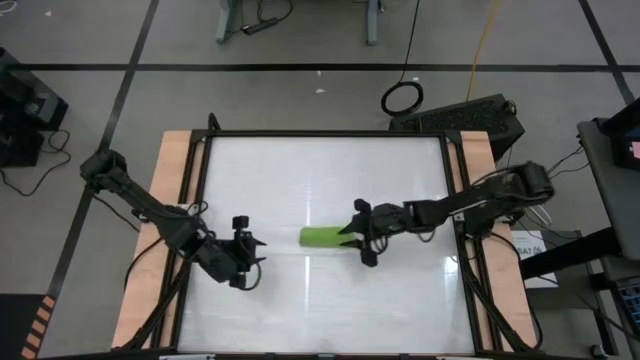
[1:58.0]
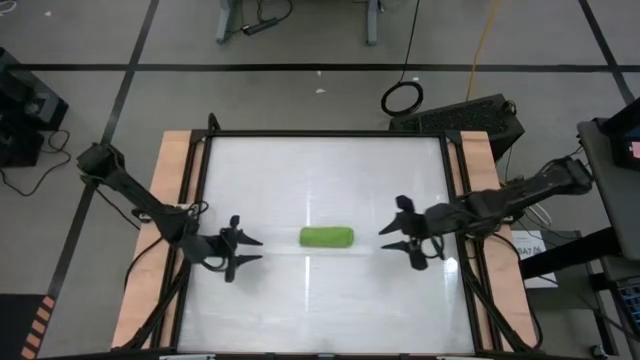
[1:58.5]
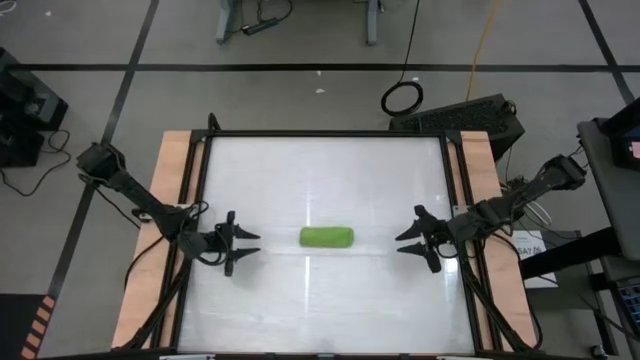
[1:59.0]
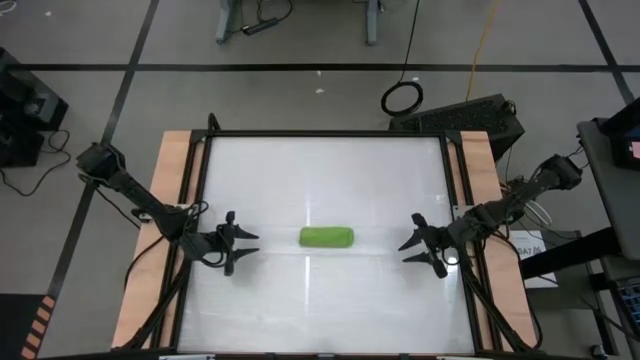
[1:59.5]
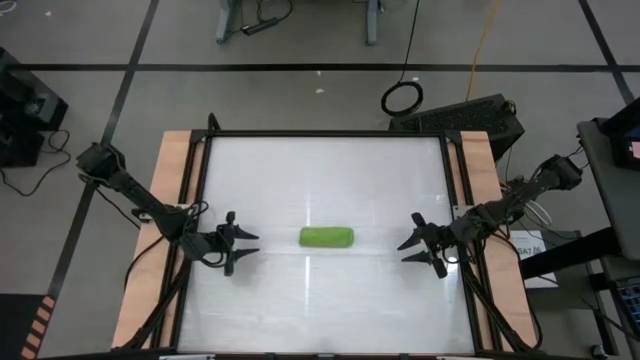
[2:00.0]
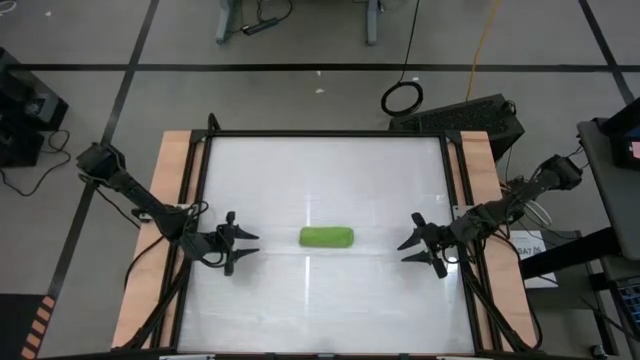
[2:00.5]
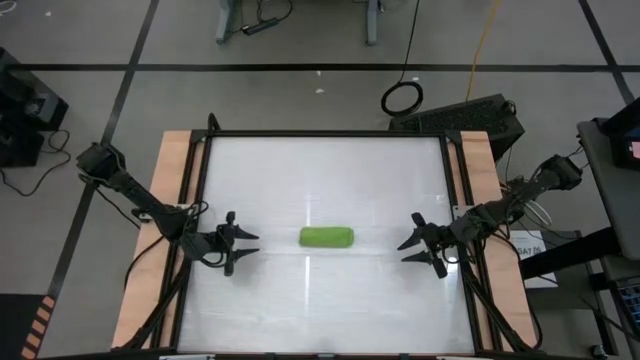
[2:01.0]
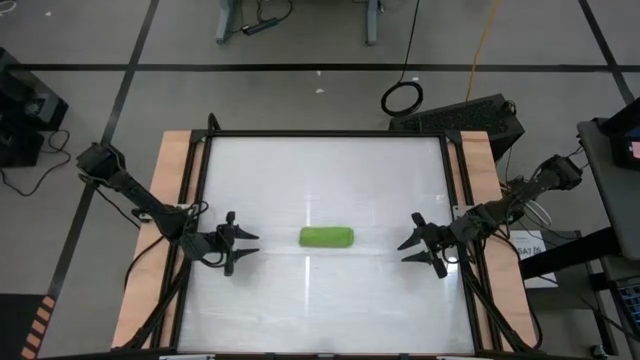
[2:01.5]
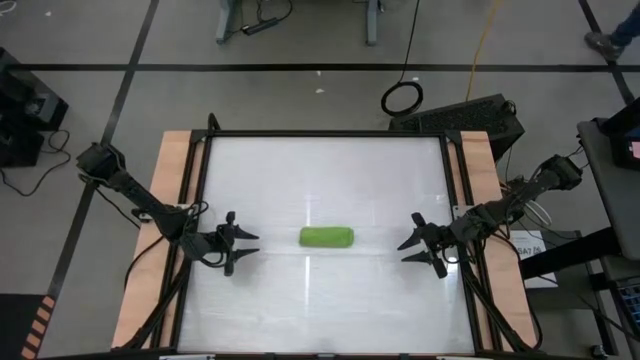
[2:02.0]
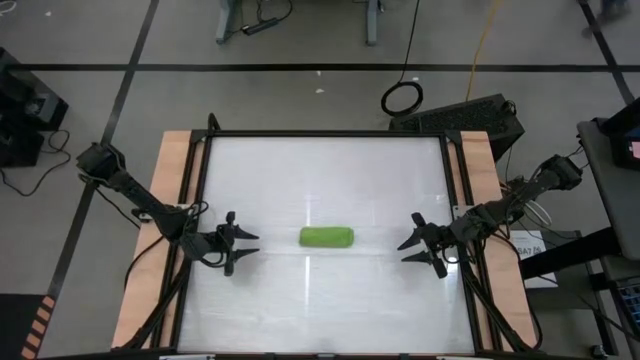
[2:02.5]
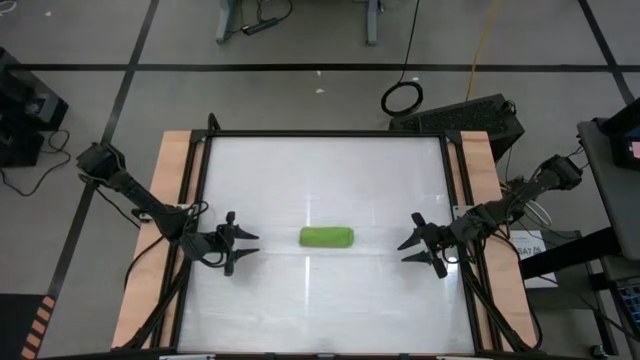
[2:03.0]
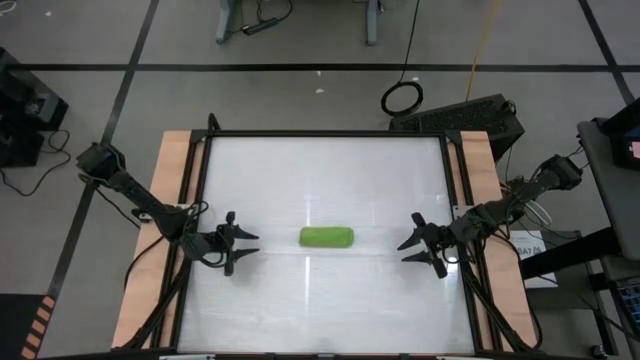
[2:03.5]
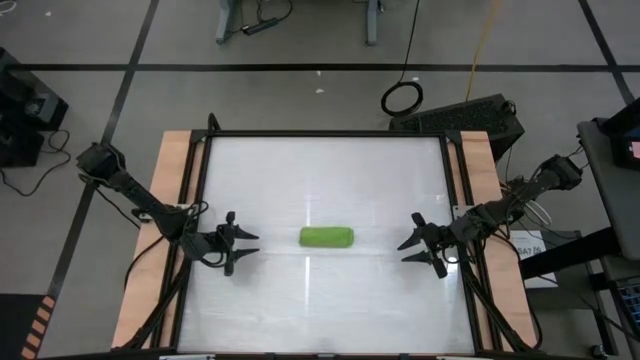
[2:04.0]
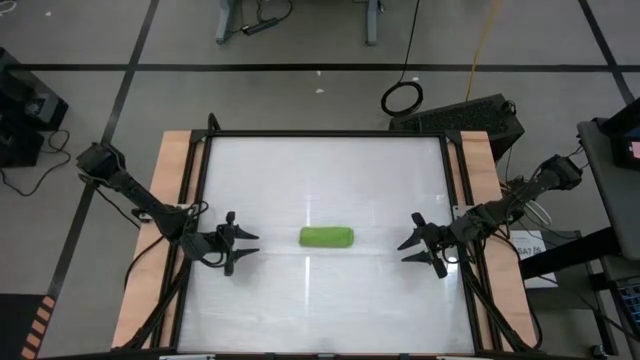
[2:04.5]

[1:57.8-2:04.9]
Task: Roll towel
Return to Home Position

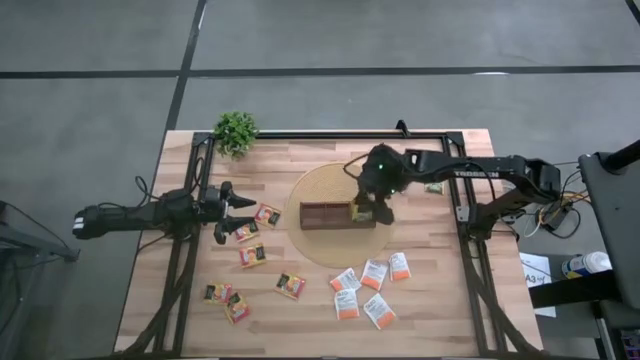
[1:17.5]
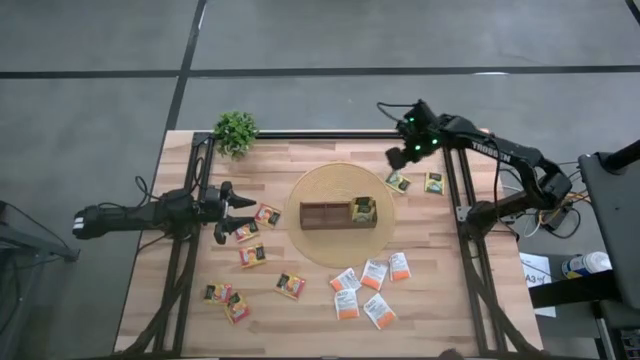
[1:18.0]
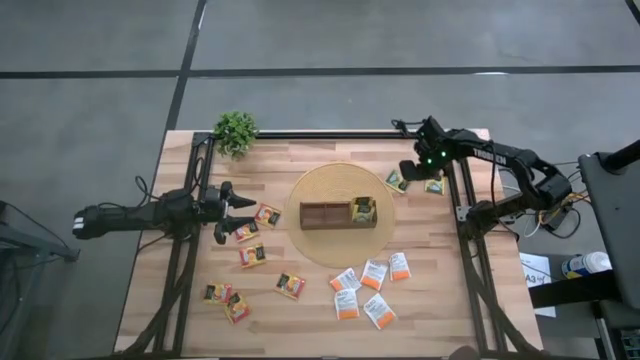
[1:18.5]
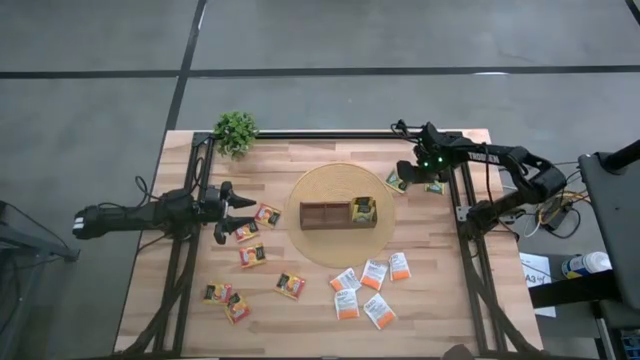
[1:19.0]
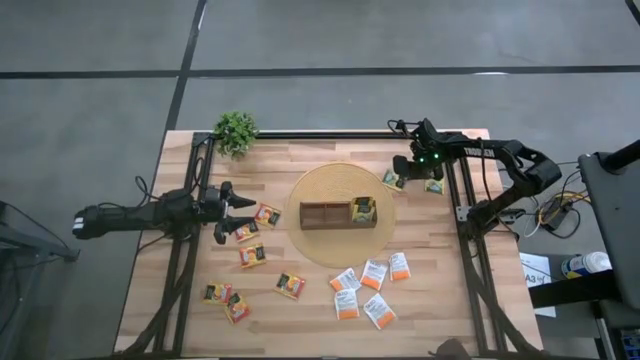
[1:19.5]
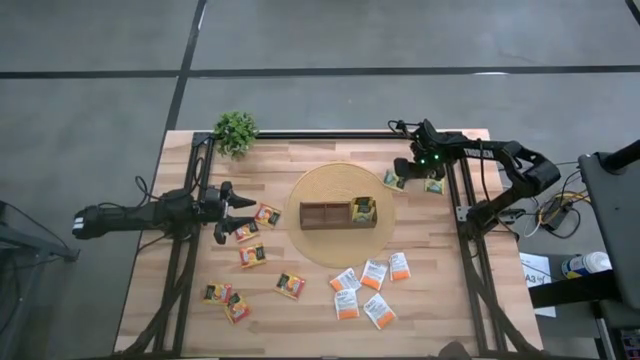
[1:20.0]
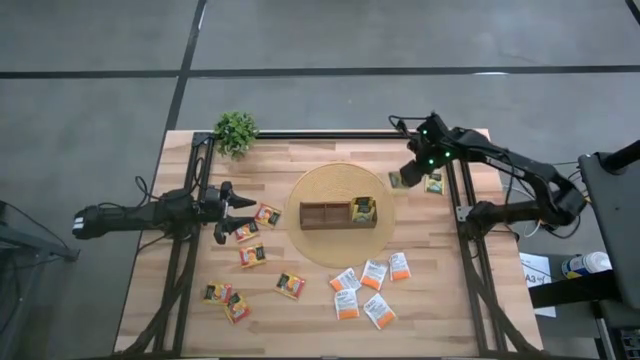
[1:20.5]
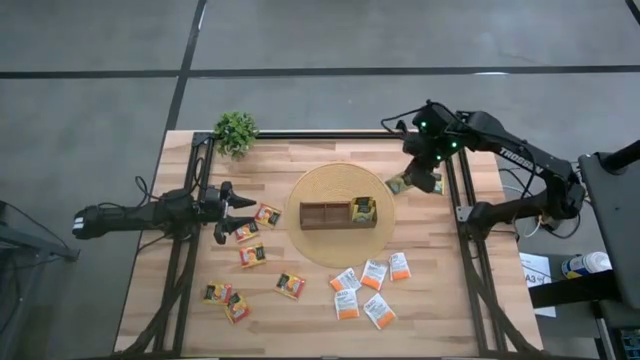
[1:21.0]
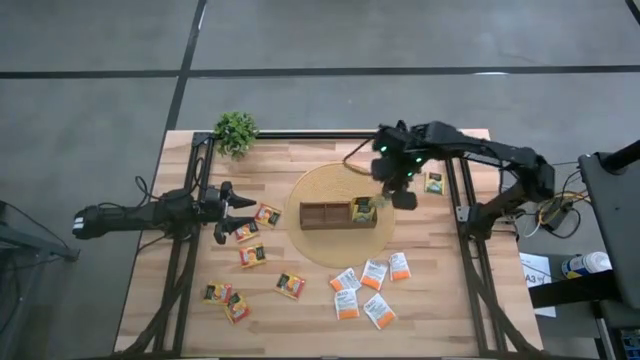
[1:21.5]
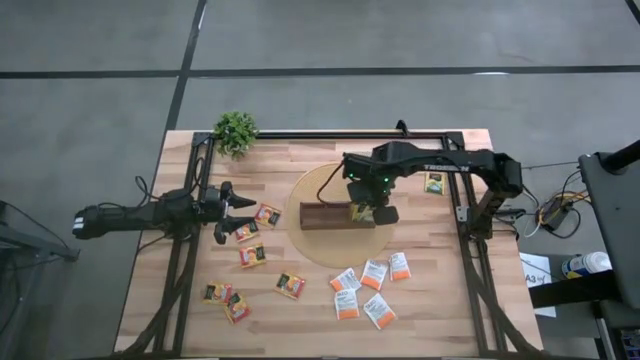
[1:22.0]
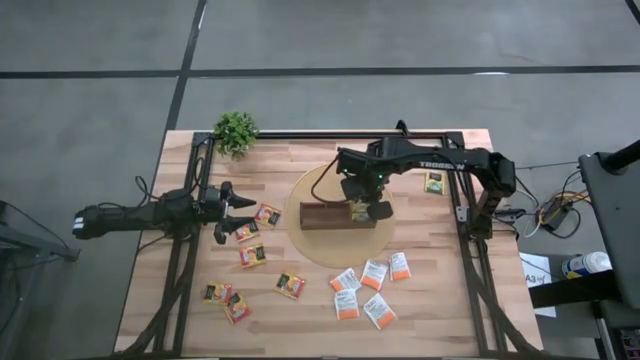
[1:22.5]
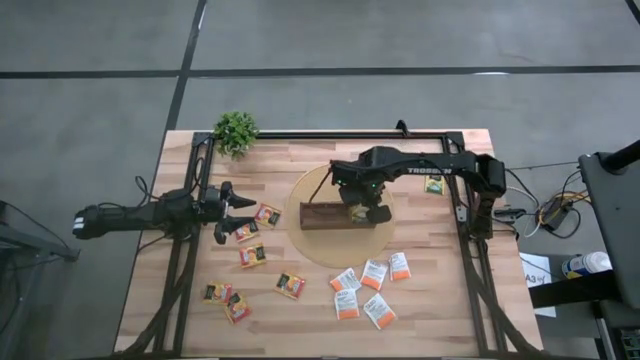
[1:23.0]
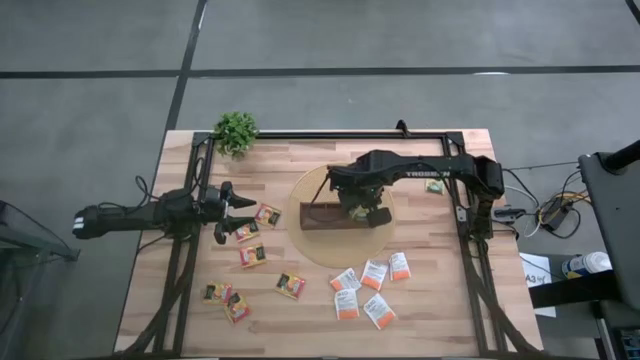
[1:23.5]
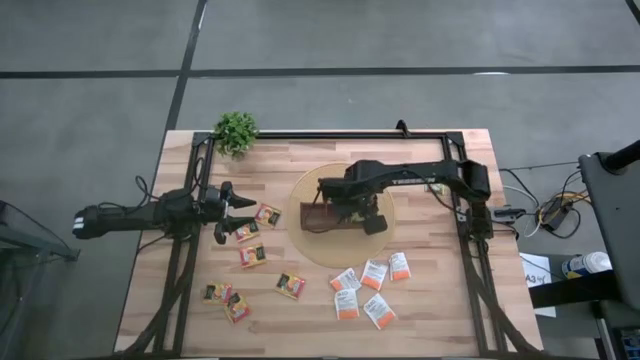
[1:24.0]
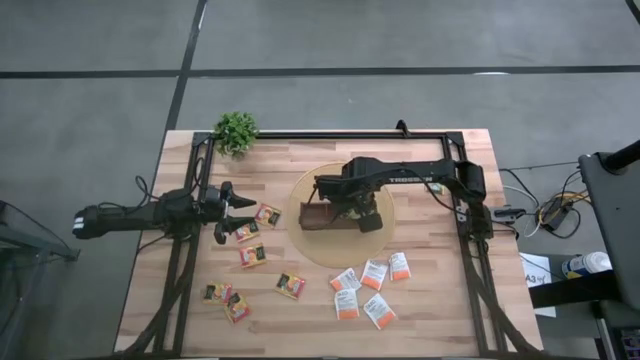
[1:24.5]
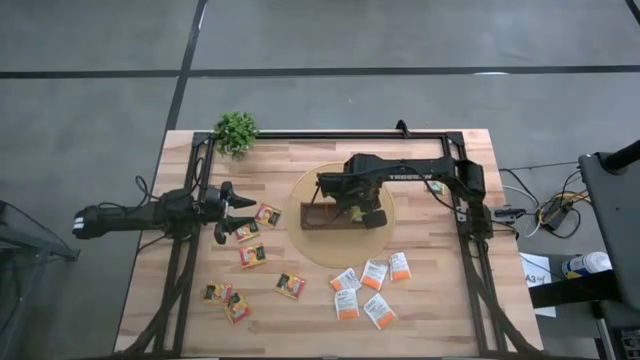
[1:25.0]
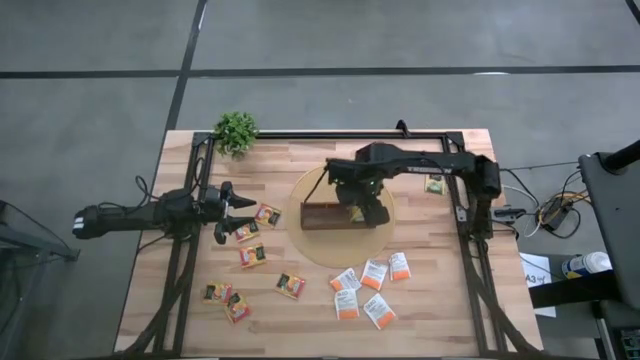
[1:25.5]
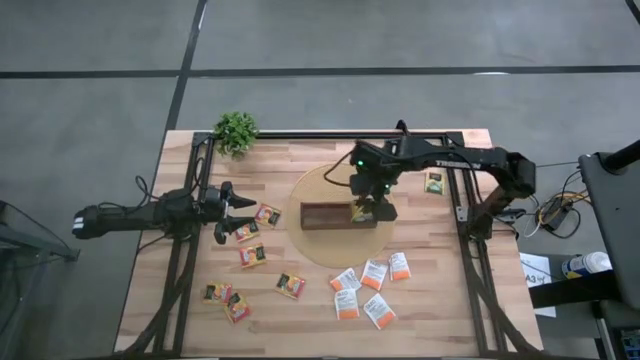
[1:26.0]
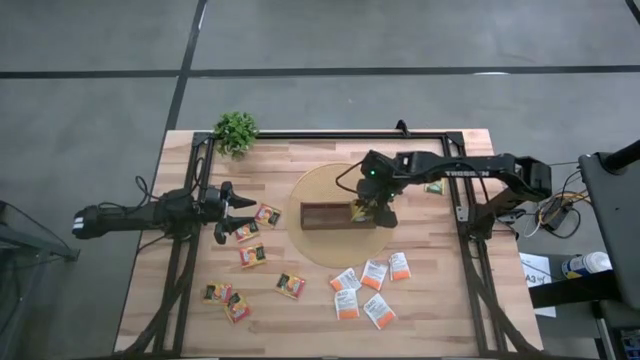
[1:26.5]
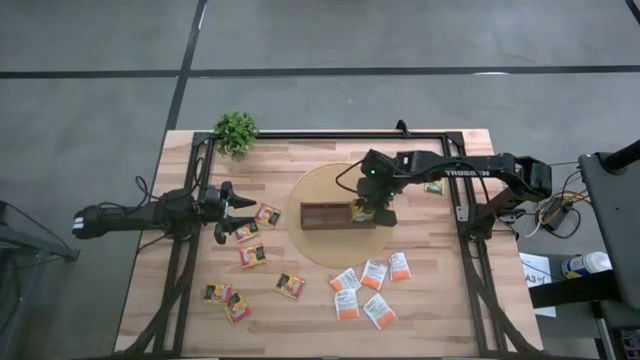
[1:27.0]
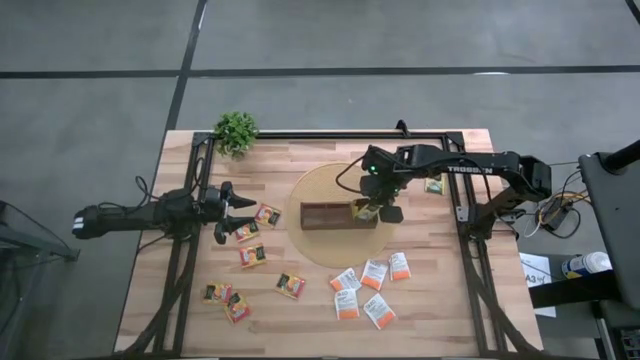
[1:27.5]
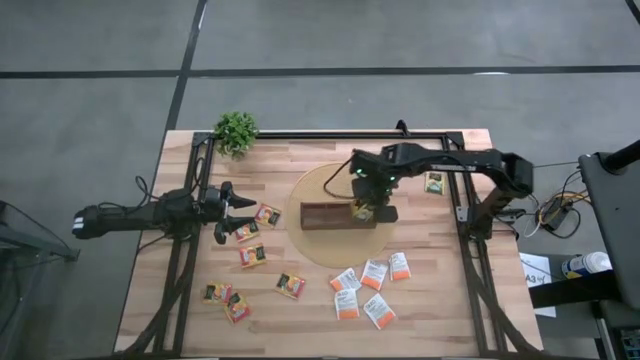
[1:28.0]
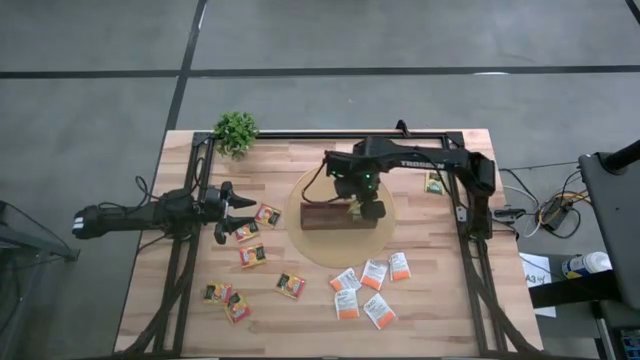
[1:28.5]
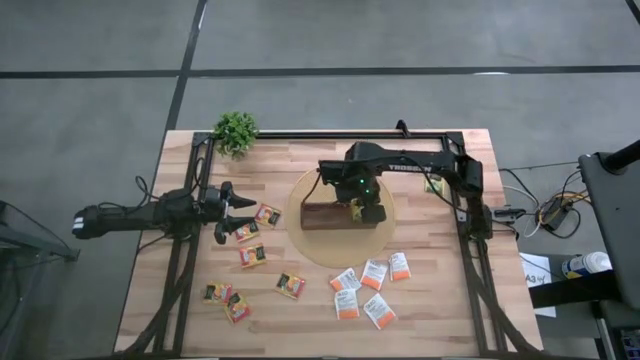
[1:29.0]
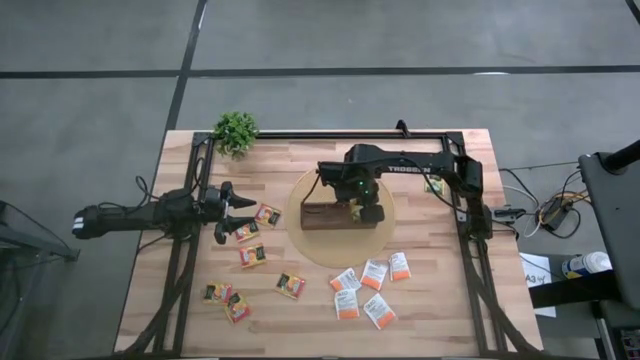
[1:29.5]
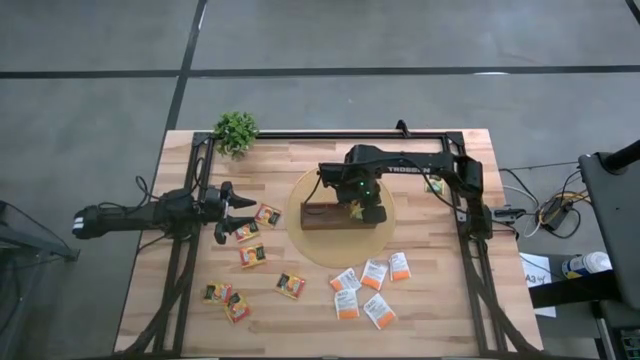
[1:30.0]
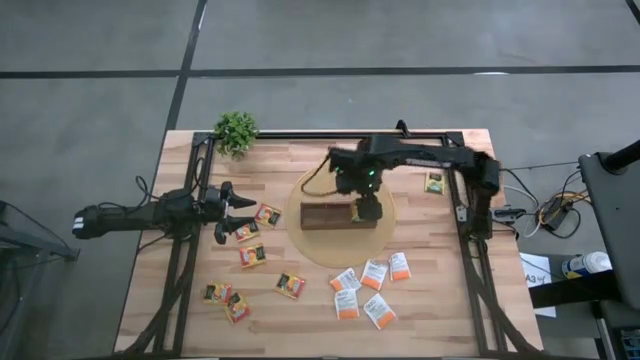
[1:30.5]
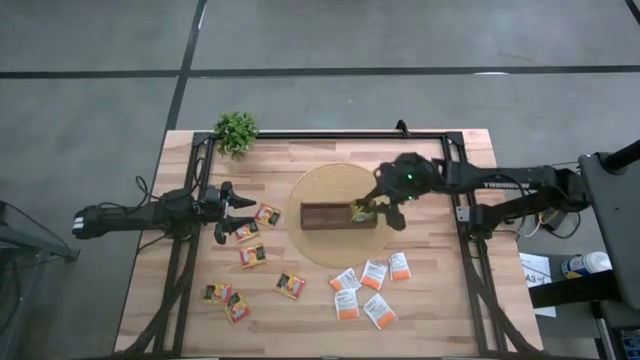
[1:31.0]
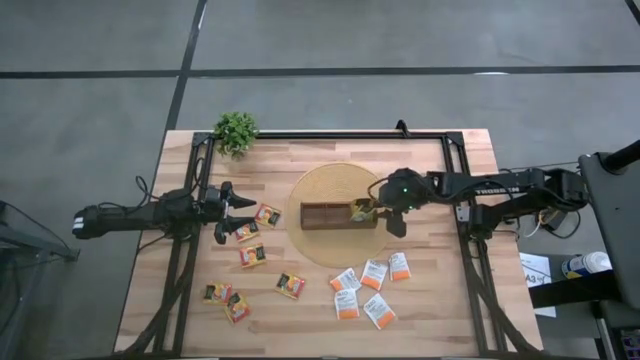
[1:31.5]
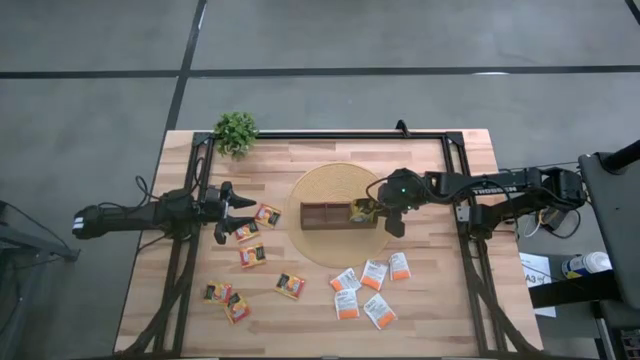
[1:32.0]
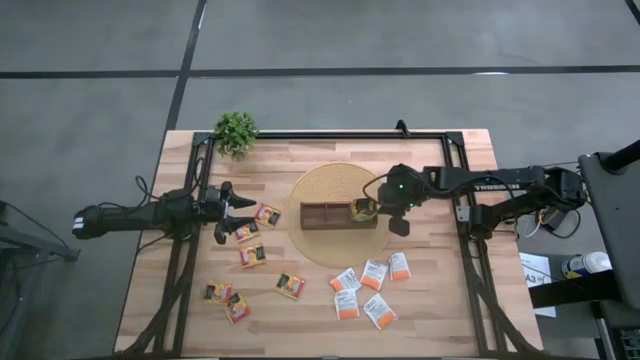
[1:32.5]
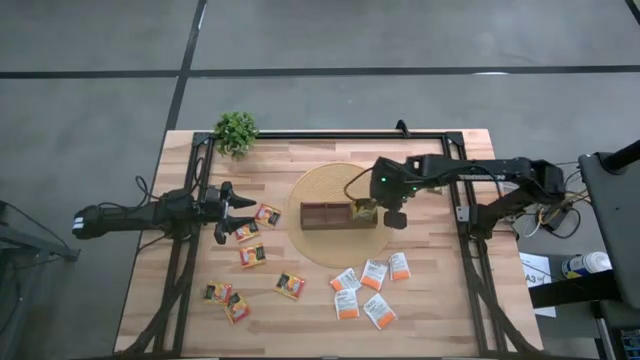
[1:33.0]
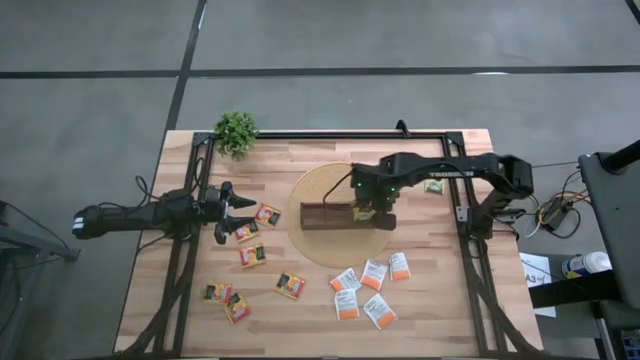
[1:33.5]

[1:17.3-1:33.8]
Task: Pick & Place Tea
Put the yellow tea bag into the right section of the wooden organizer
